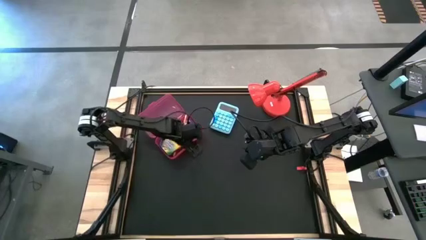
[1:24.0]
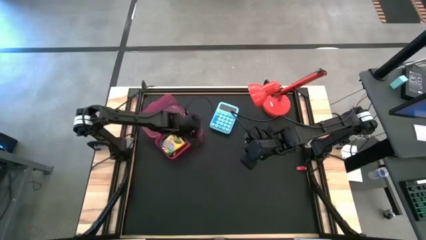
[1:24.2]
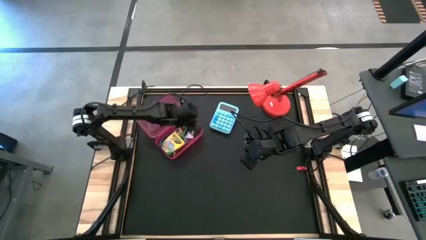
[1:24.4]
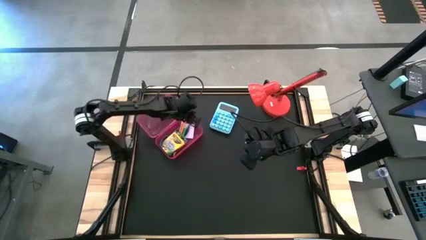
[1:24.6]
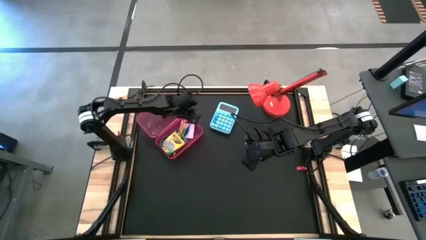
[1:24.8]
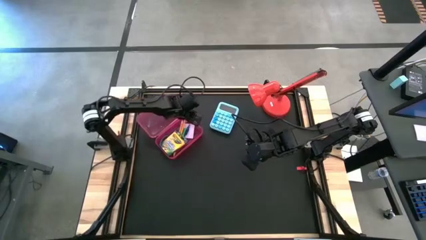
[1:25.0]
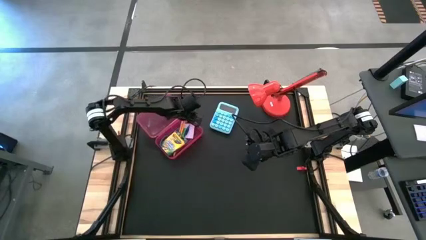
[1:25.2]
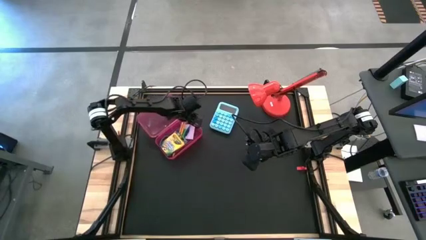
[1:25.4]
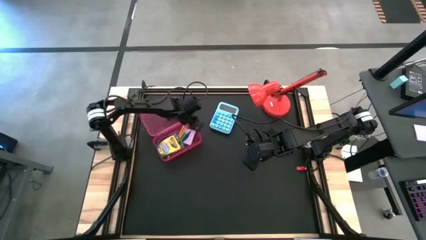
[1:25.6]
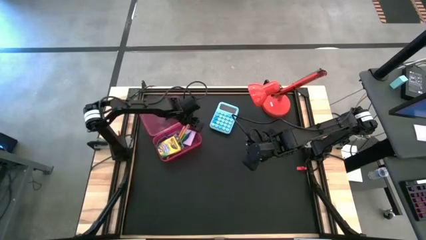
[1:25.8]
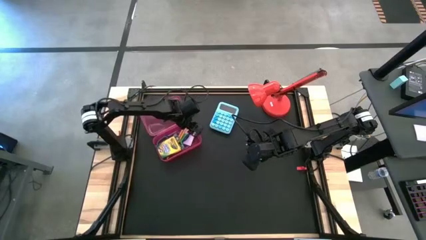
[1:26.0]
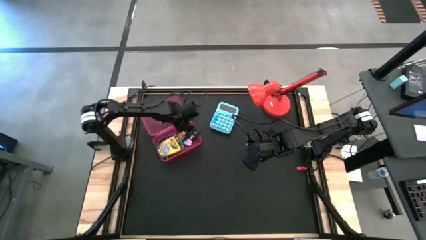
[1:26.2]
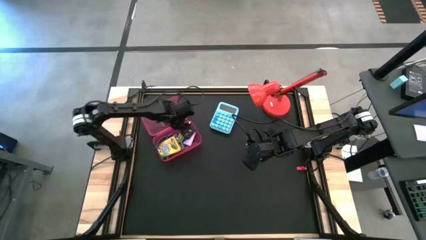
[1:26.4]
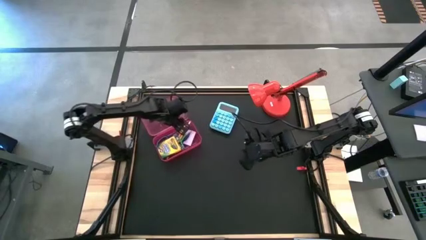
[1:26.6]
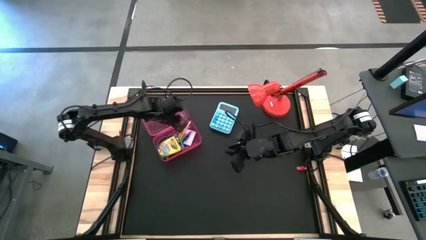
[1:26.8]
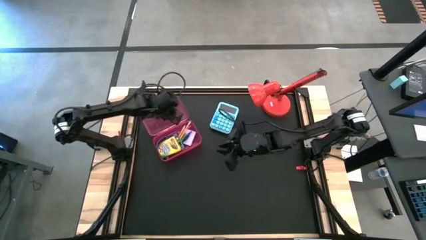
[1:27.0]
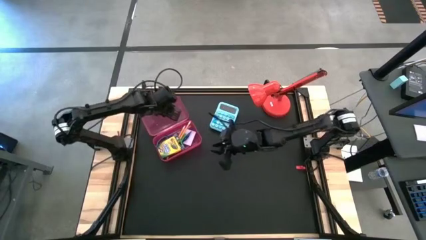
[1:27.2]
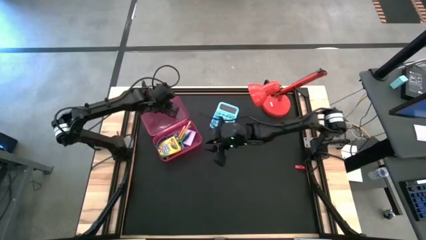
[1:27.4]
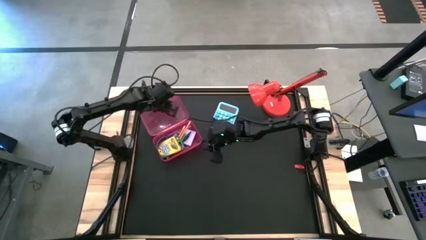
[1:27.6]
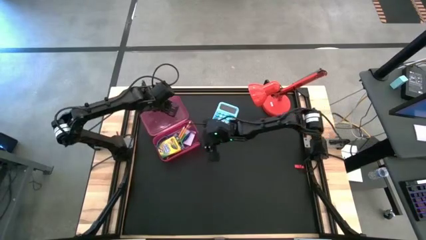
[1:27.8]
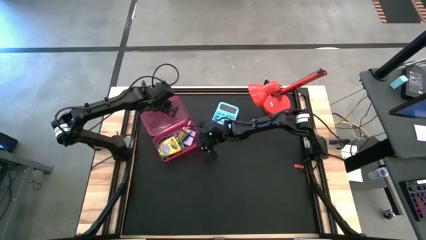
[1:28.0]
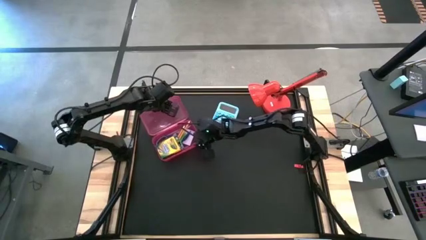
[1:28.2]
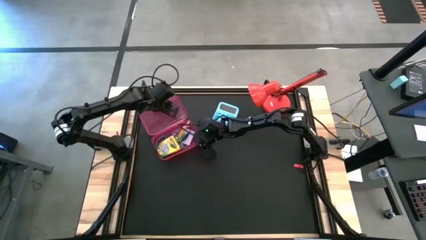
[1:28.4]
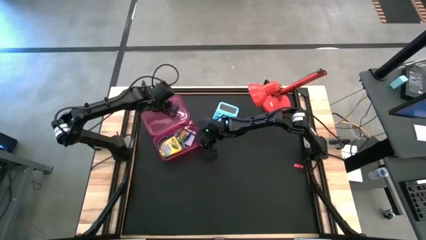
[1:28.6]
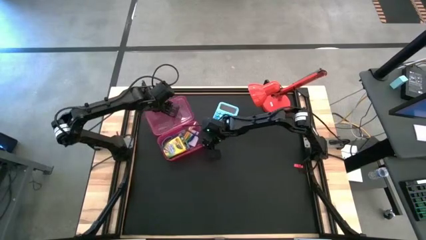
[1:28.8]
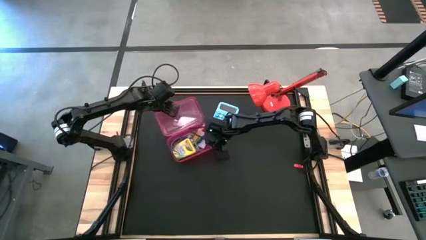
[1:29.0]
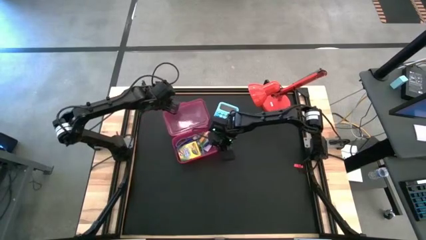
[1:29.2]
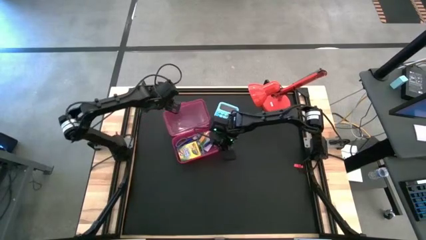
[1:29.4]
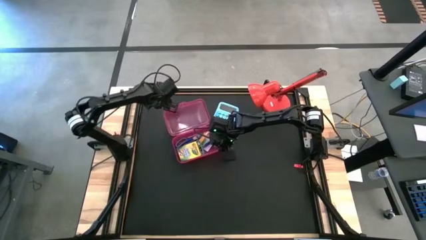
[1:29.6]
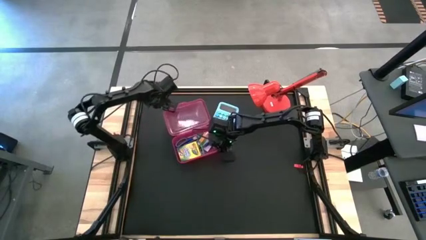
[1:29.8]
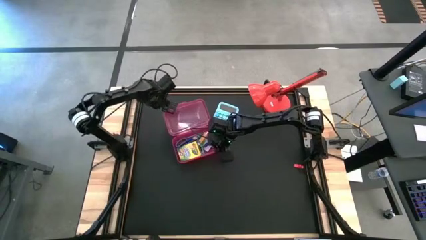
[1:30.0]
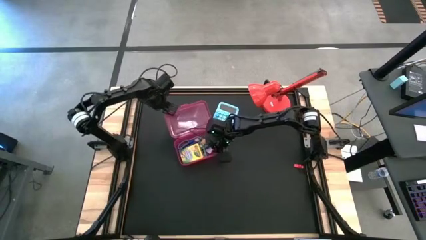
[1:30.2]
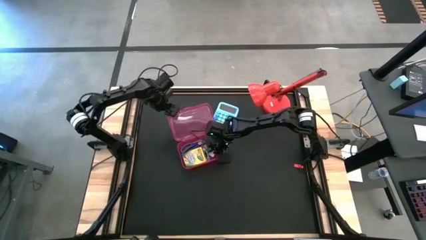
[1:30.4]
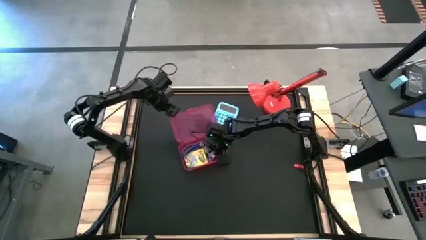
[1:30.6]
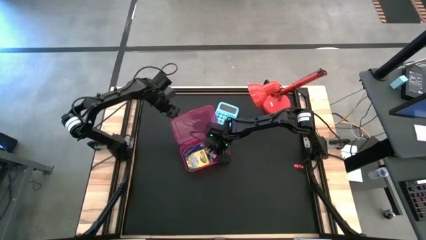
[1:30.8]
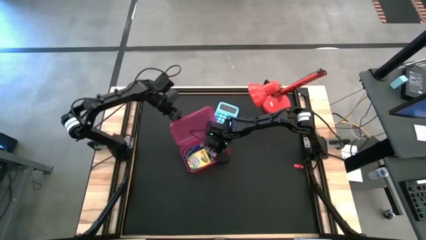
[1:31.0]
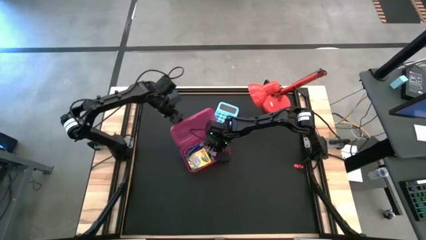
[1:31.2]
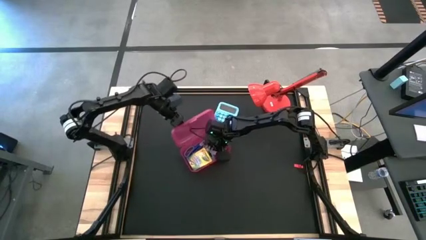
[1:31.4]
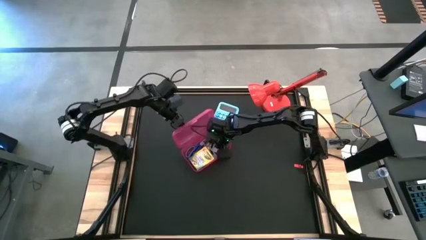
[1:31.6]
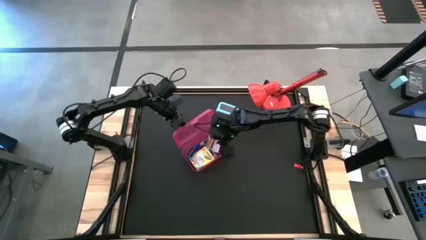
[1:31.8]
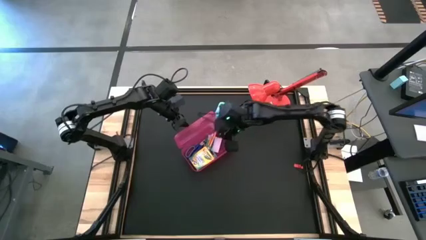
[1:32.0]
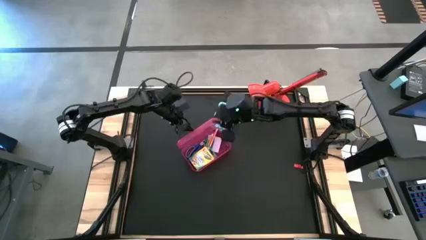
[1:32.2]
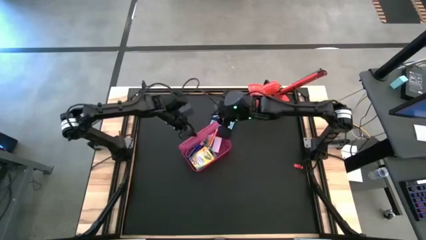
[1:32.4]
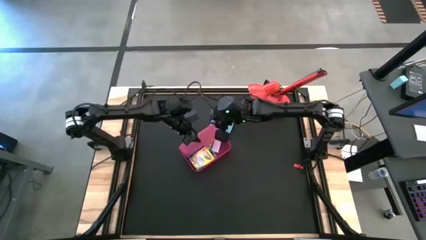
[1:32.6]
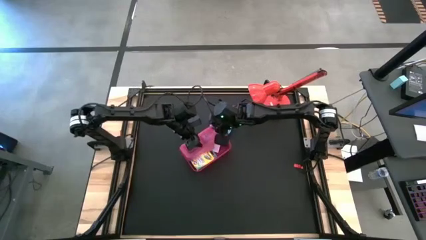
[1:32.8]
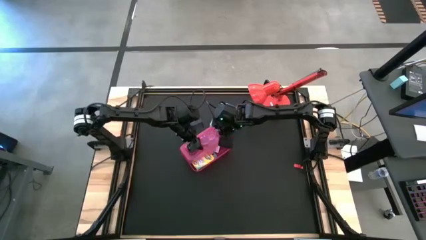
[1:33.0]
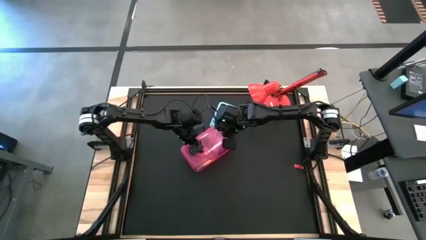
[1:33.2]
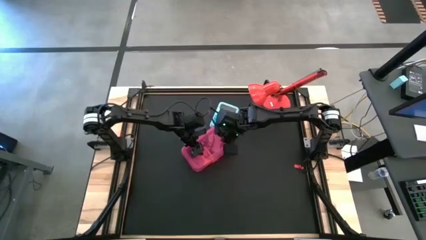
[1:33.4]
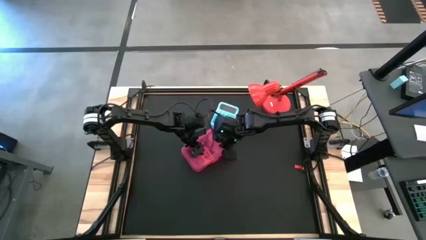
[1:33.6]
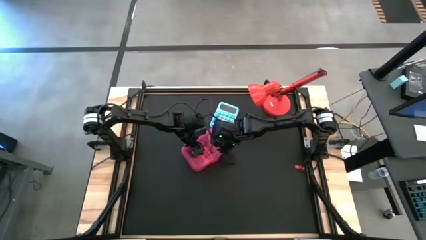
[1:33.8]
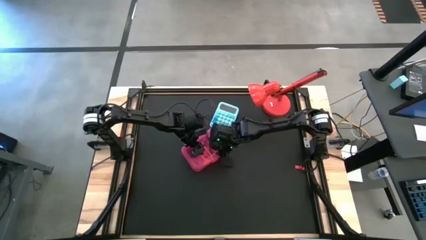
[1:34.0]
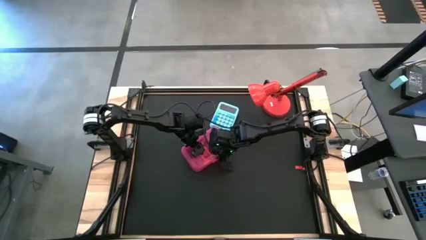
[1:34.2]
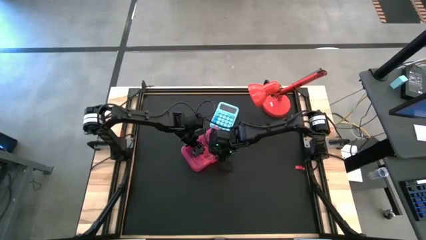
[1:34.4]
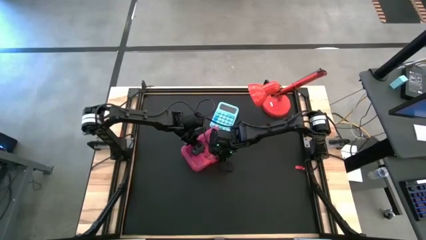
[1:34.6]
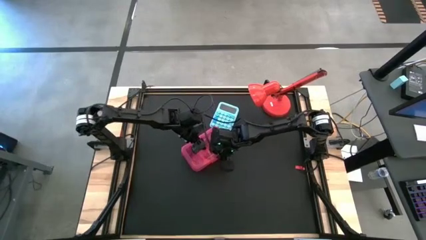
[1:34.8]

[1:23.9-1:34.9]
Task: Pack school essentials
Close the lid of the pink supply box

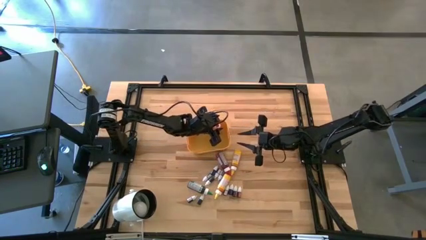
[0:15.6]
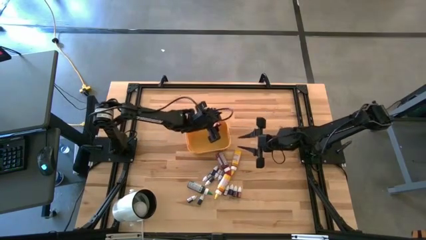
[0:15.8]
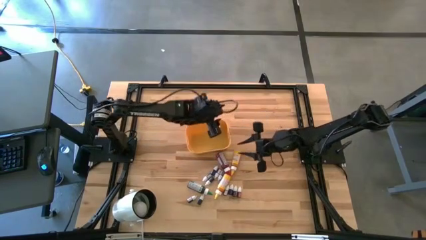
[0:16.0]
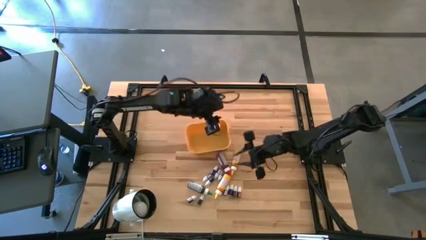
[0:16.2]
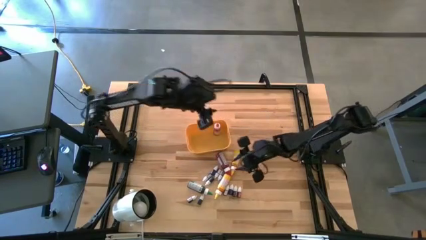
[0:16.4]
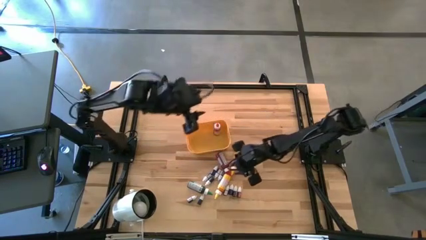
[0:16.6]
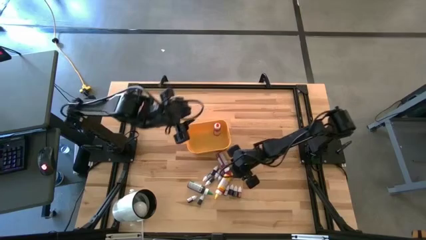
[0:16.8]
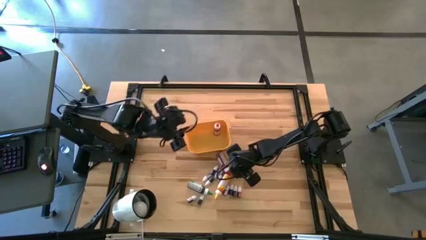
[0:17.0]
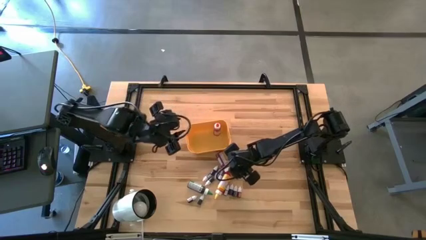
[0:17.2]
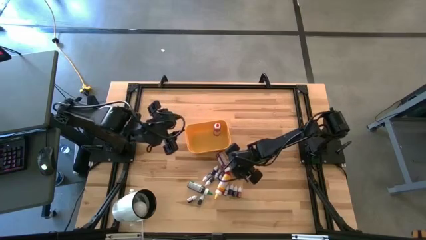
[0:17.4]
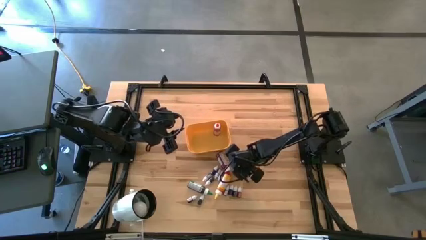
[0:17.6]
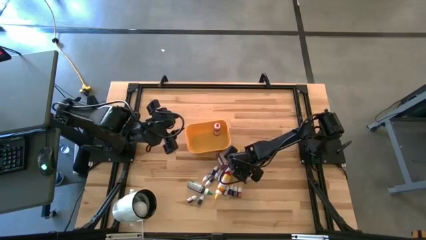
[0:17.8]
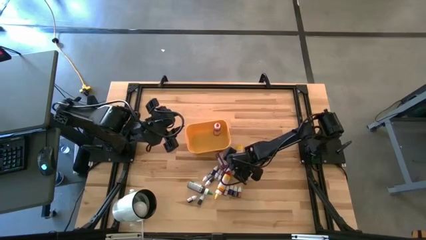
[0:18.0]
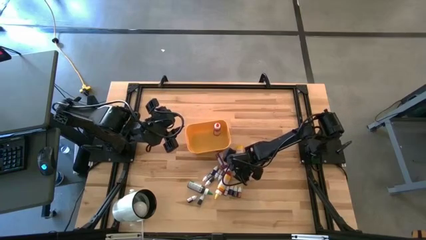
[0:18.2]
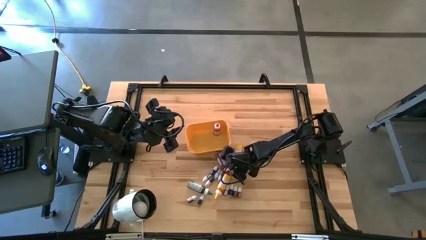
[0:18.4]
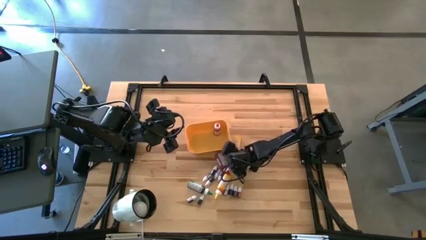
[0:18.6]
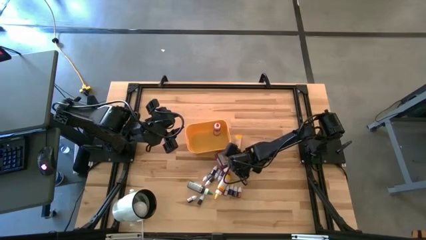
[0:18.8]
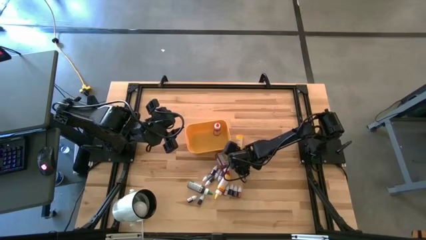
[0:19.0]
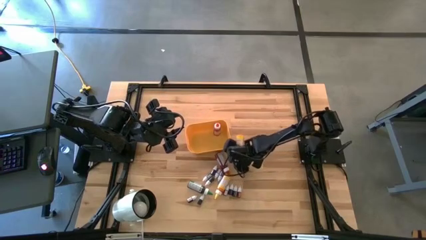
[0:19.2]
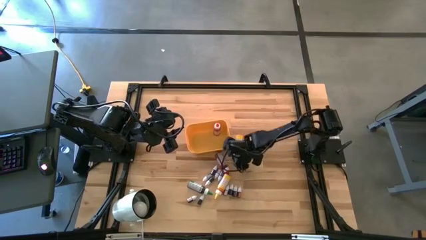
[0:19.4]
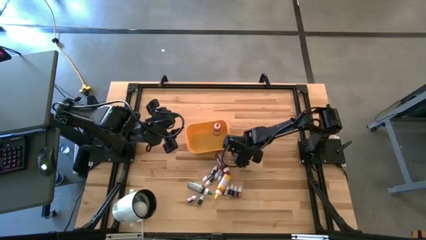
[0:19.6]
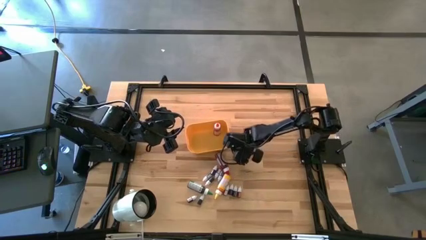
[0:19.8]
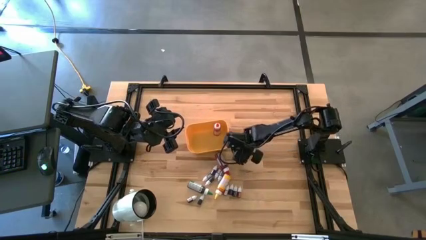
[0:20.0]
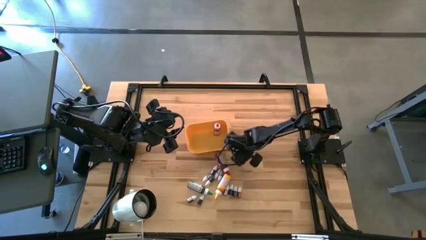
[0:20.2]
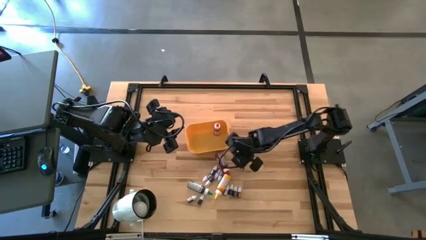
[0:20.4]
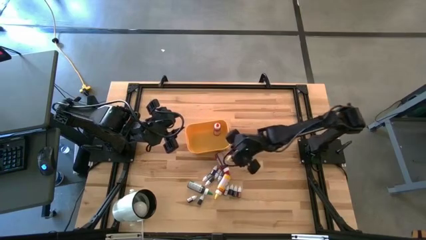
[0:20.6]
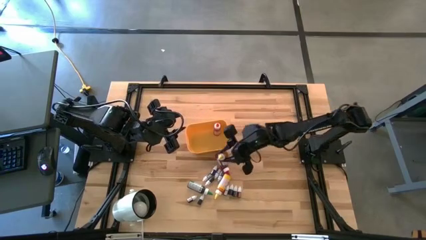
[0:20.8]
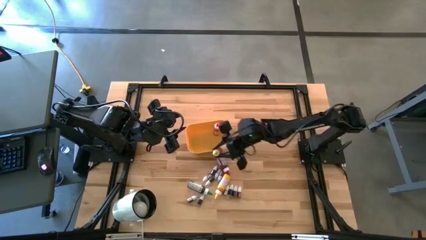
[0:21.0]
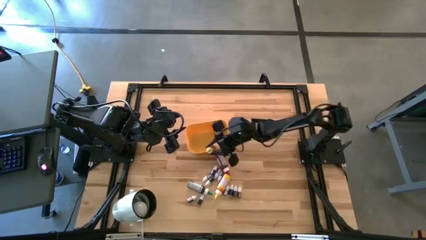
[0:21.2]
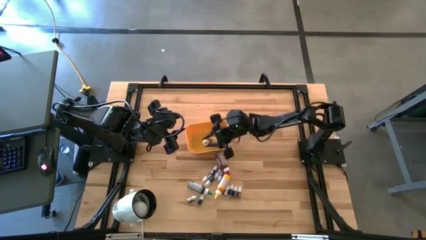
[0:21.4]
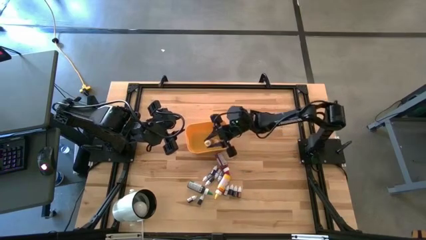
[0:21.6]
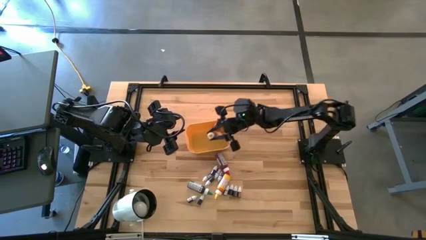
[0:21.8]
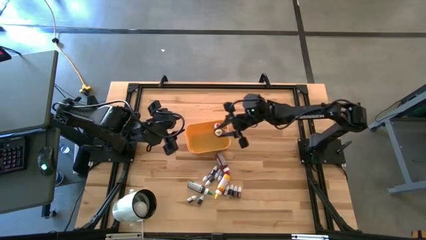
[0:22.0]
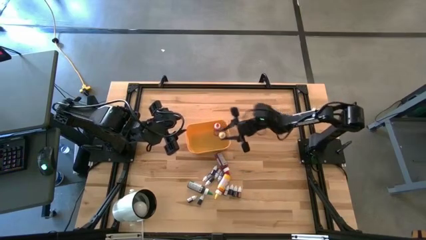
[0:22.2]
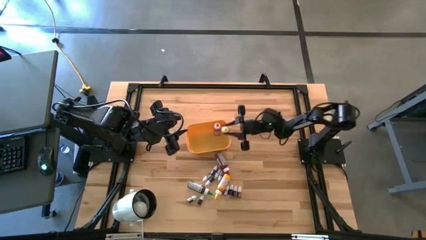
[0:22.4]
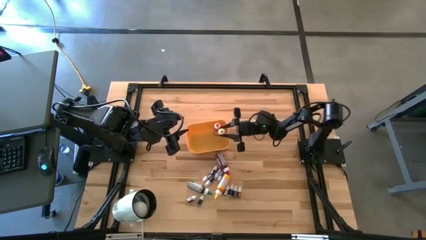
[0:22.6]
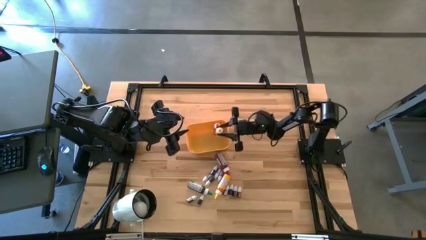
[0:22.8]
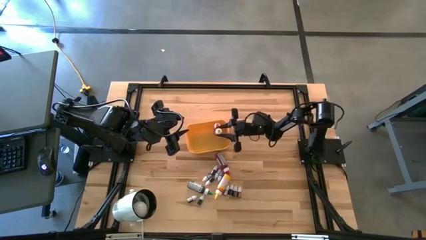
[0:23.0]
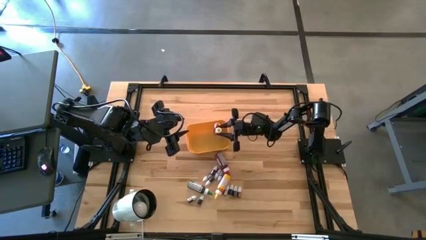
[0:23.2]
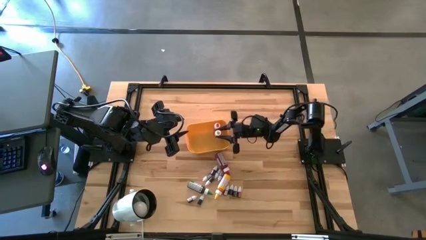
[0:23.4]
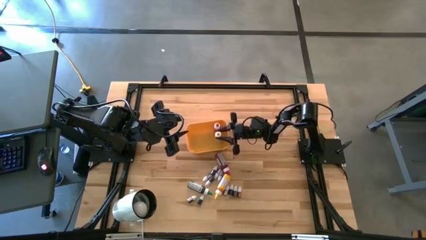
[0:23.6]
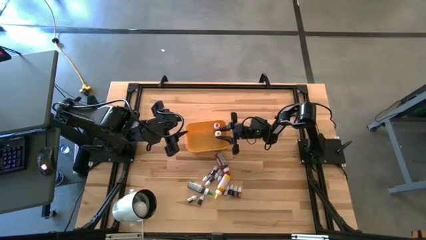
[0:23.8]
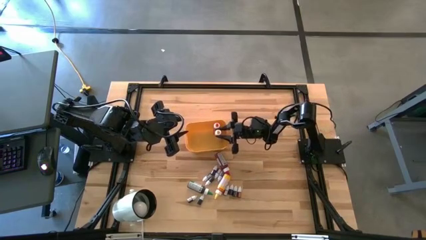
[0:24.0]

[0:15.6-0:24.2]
Task: Pick & Place food coloring
Put the large yellow food coloring bottle into the yellow bin
